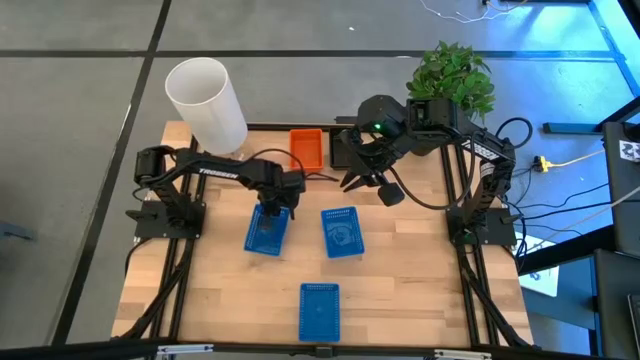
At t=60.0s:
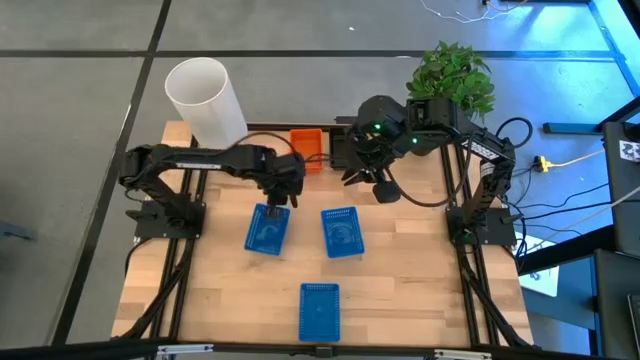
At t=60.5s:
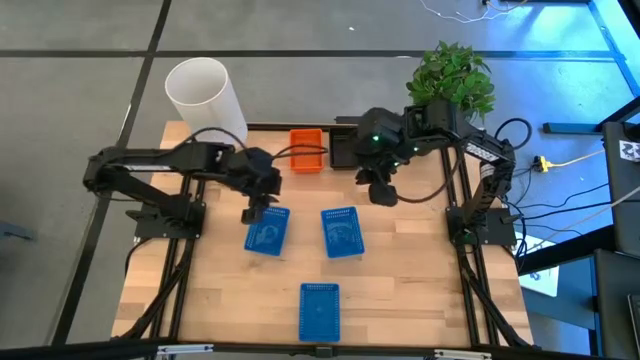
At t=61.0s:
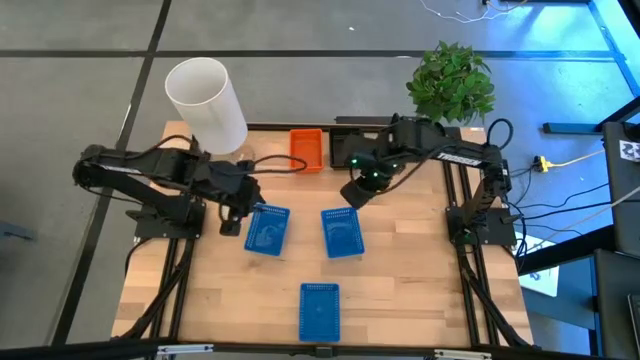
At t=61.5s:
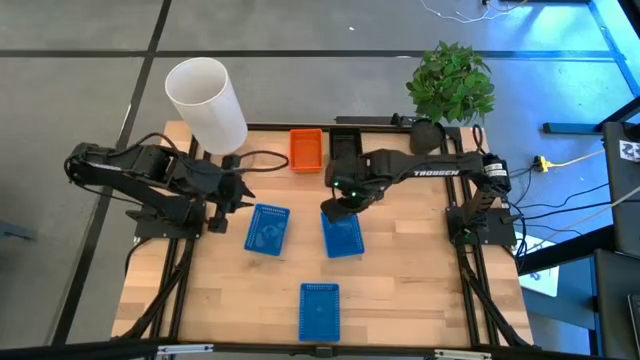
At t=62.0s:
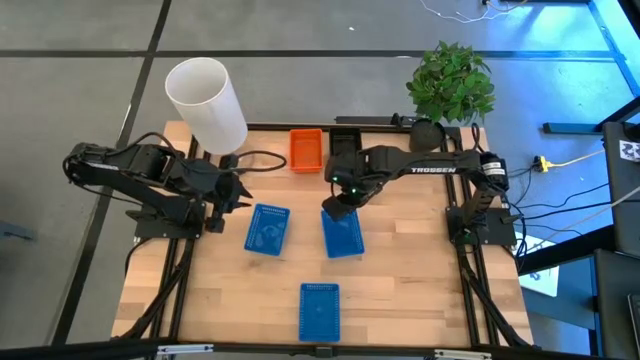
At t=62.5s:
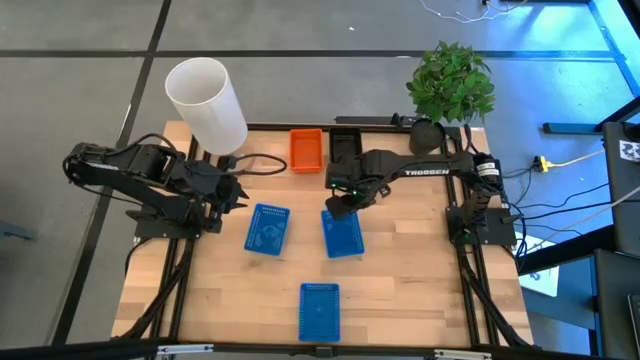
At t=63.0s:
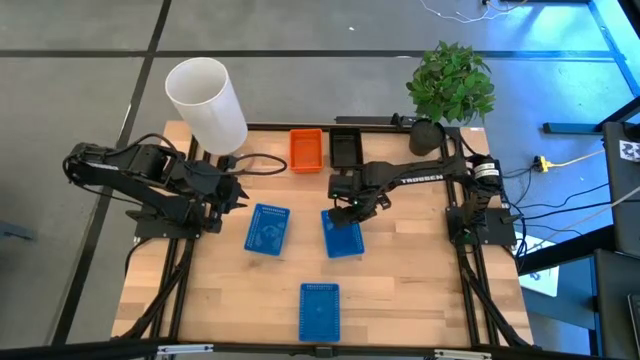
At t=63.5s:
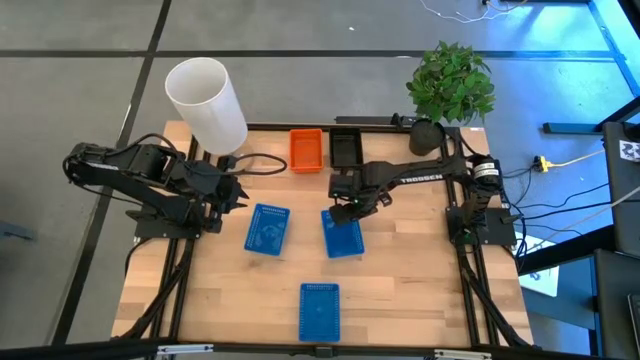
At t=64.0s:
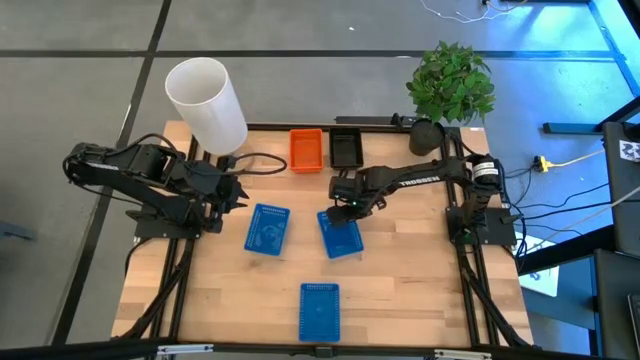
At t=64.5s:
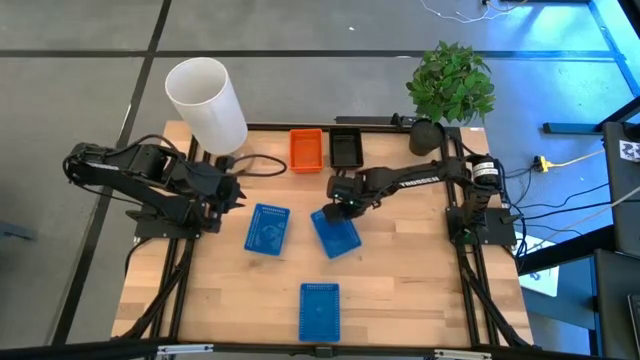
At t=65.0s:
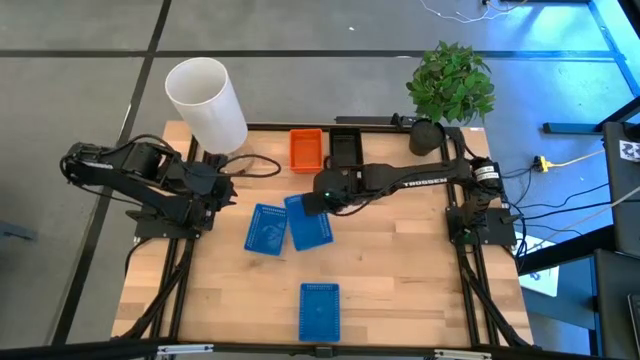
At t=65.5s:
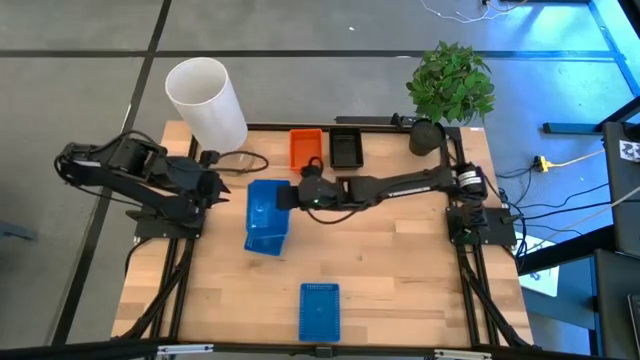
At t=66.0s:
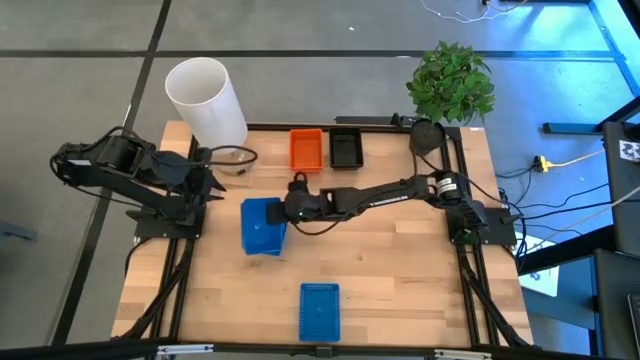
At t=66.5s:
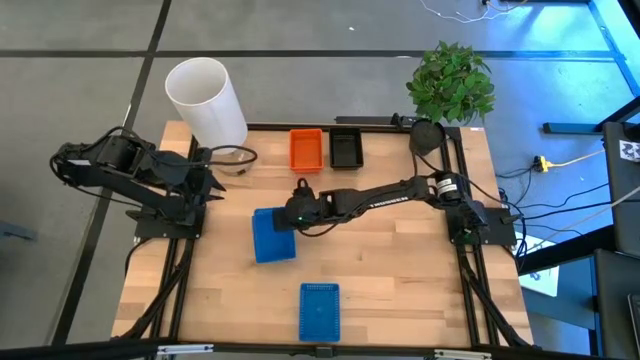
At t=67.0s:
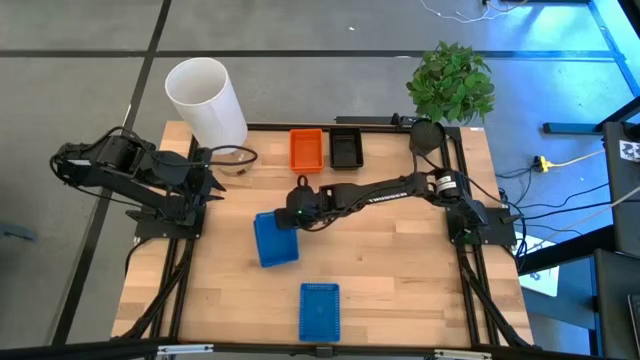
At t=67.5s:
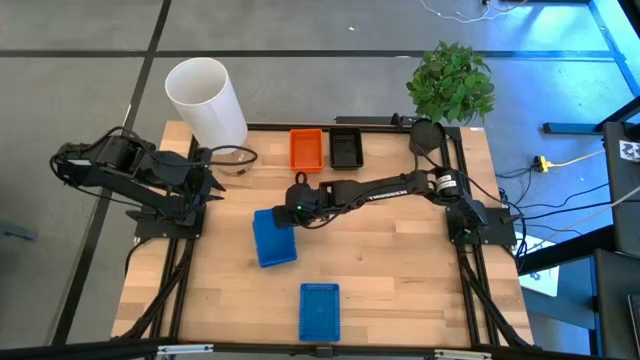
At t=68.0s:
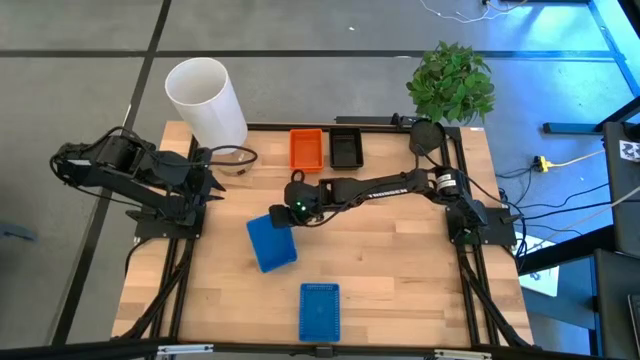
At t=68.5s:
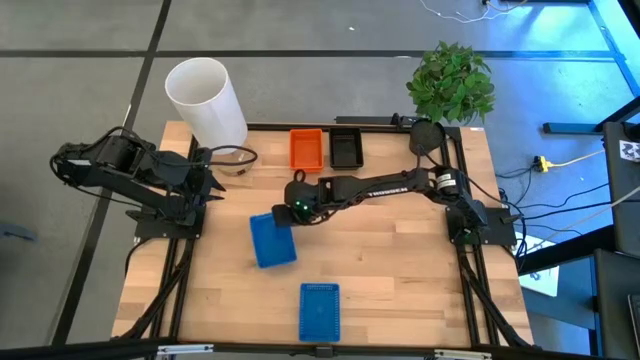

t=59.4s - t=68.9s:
Stack the top right blue bin on top of the top left blue bin

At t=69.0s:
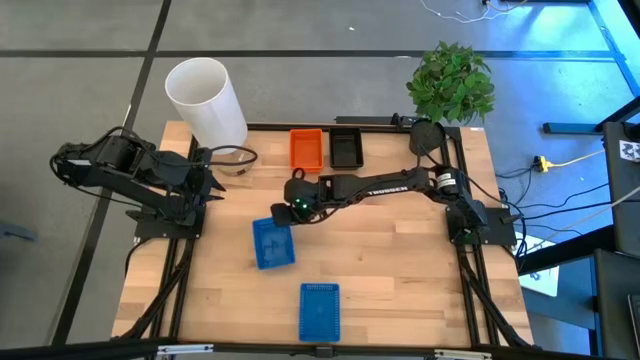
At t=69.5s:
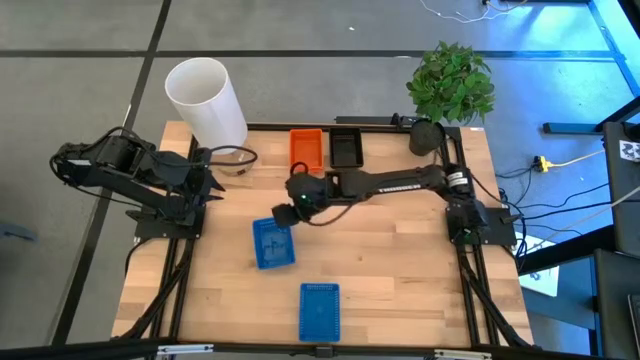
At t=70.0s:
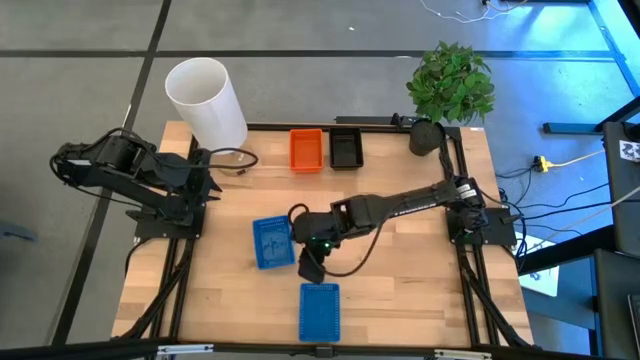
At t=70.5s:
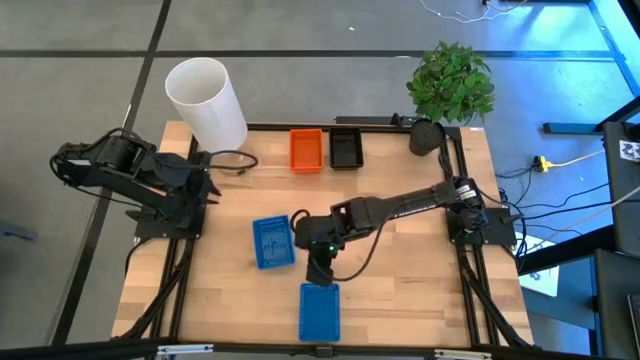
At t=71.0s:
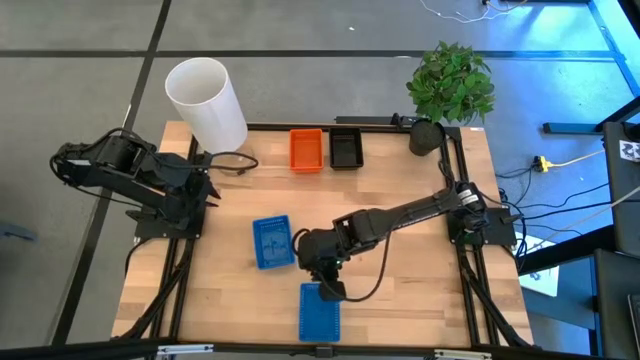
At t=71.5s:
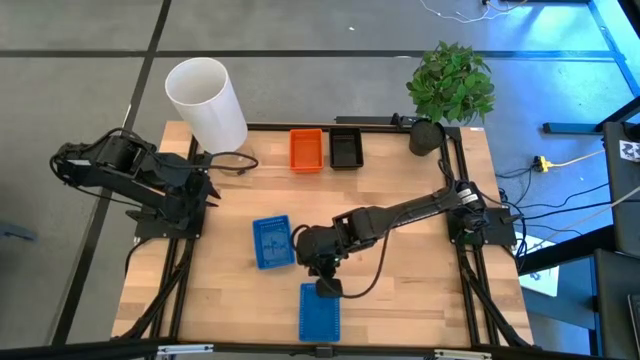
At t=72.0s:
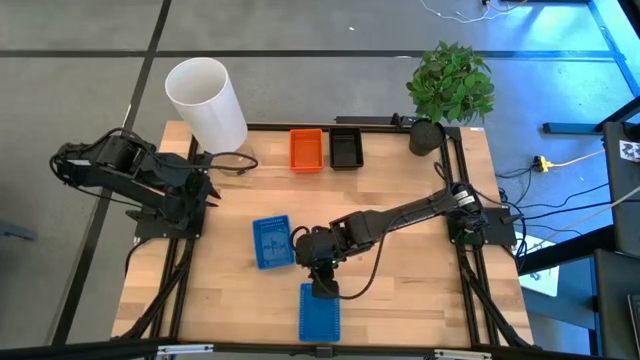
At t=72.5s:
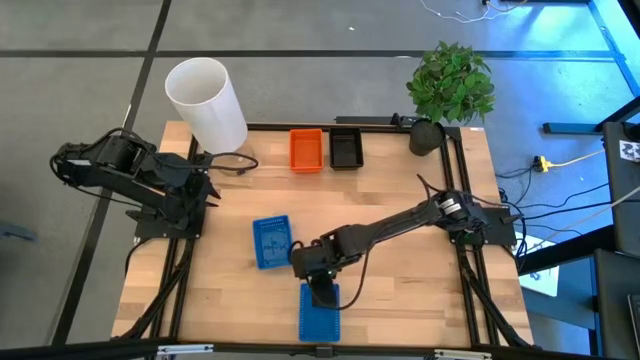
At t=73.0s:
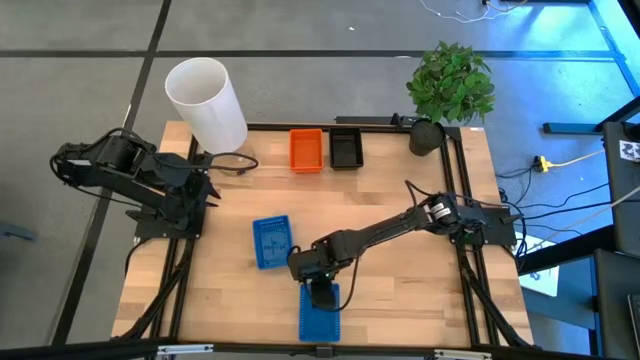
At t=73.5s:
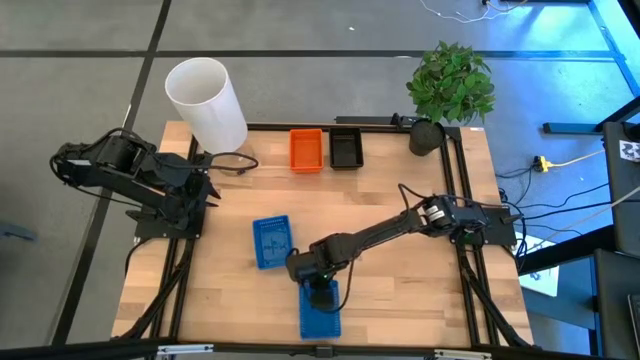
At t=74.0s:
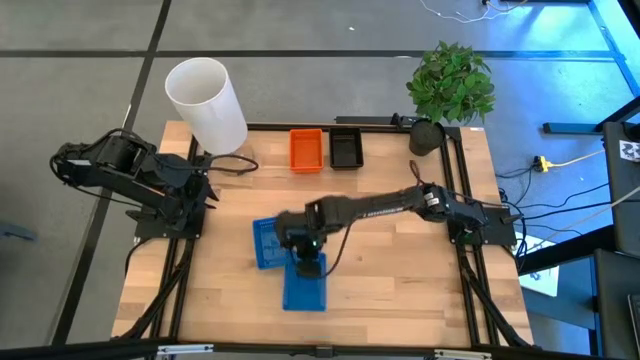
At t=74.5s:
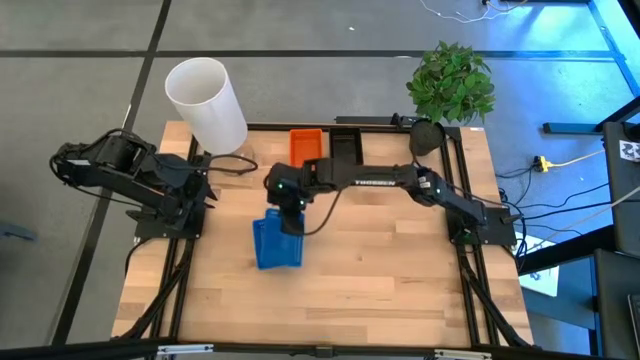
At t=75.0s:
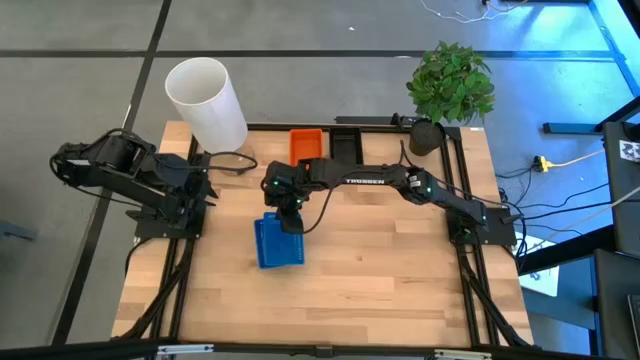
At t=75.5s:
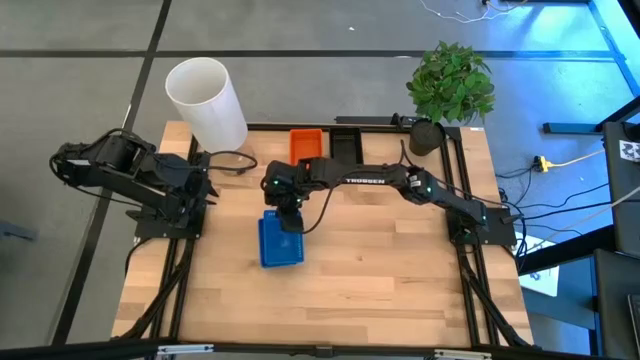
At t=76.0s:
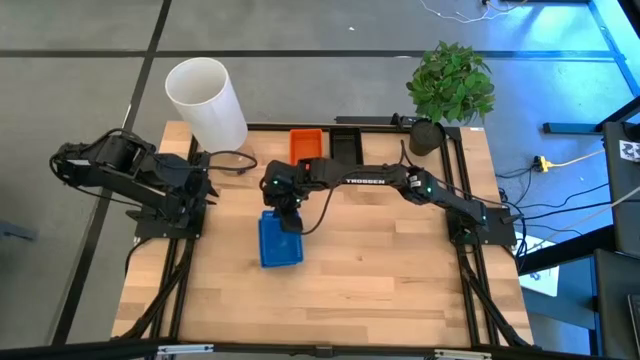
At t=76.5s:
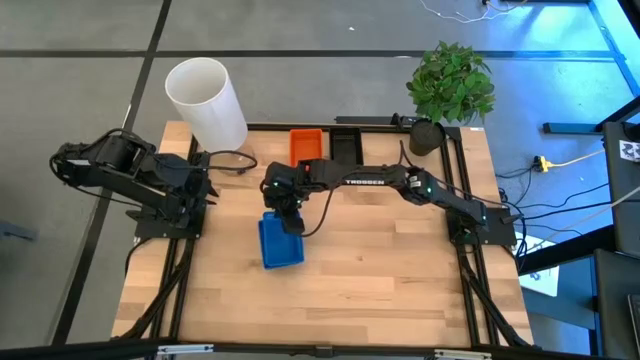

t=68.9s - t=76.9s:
Stack the bottom blue bin on top of the top blue bins

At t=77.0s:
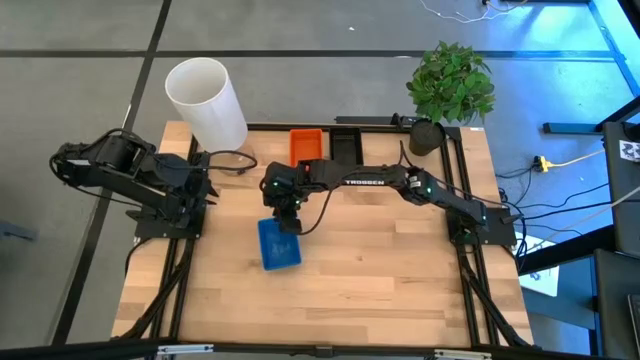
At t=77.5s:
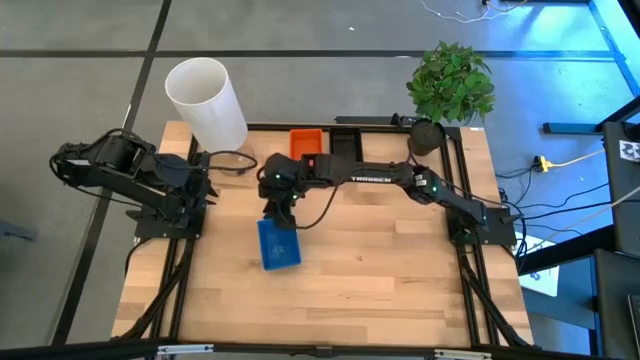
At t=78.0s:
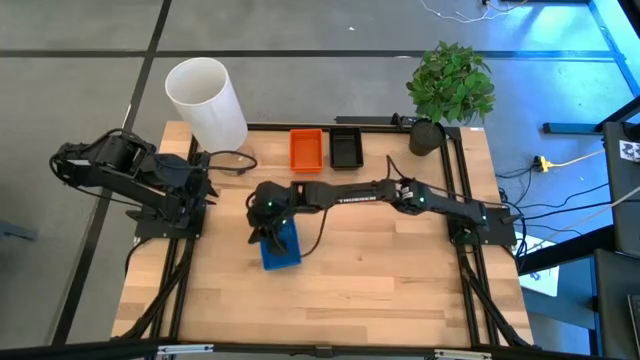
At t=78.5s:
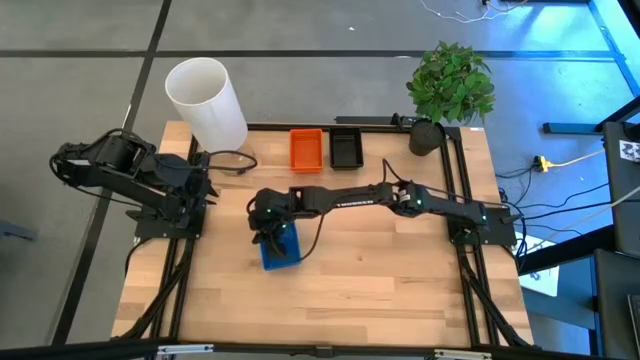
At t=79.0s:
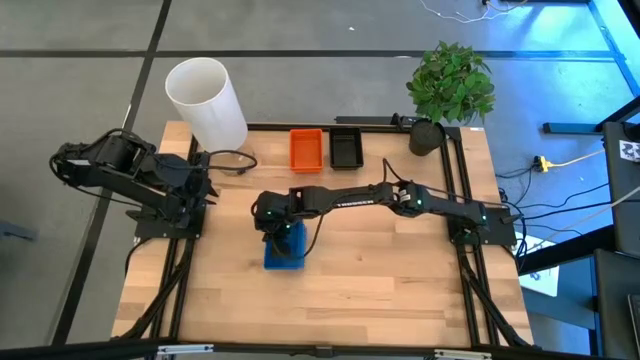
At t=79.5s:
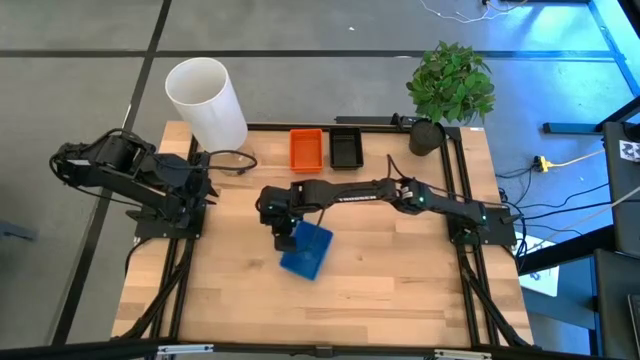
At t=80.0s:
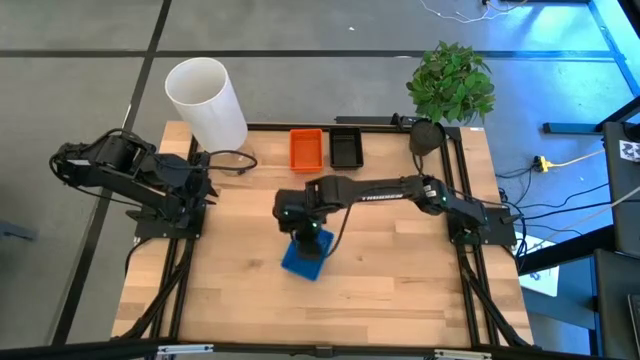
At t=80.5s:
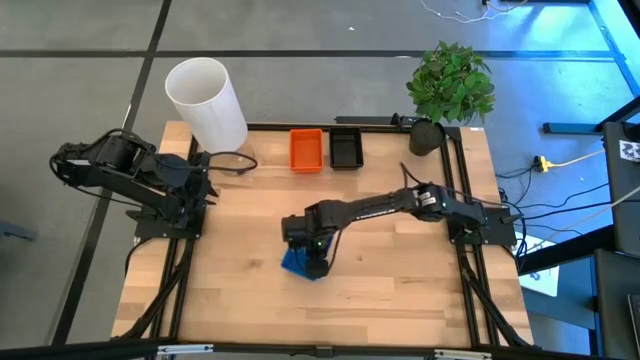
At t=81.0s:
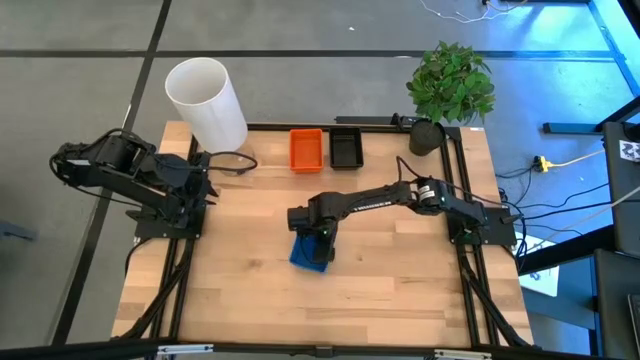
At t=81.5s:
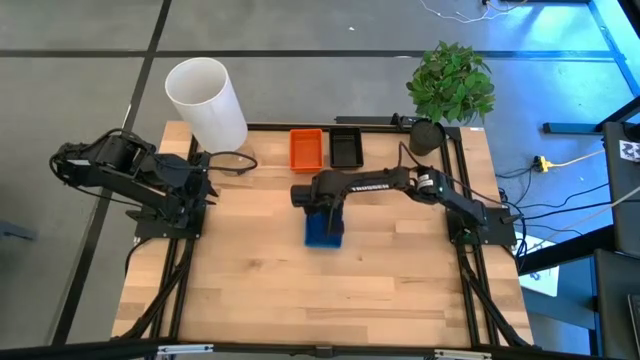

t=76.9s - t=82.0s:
Move the stacked blue bins to the center of the table
